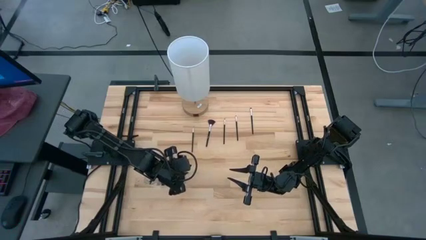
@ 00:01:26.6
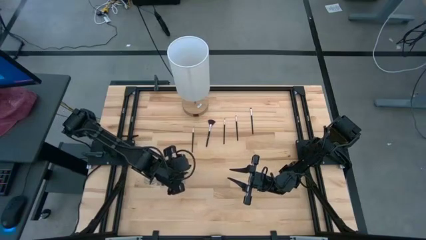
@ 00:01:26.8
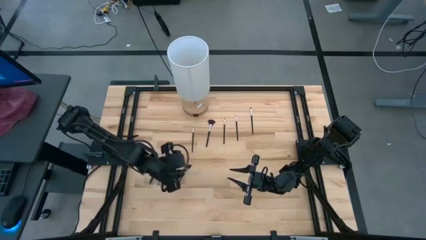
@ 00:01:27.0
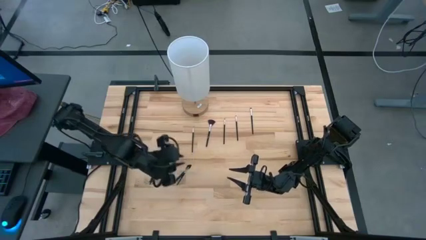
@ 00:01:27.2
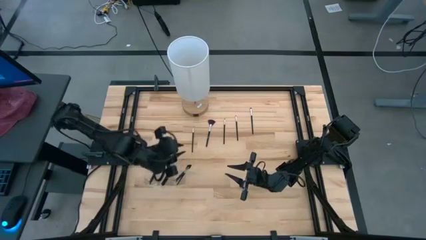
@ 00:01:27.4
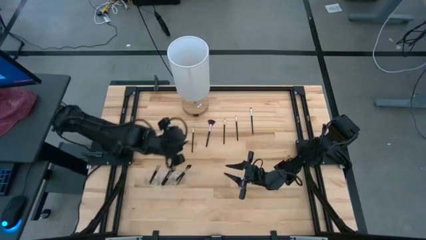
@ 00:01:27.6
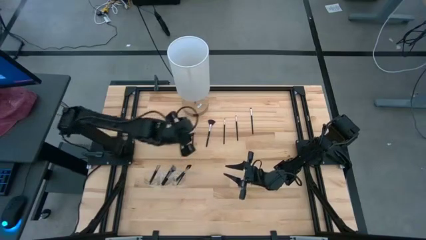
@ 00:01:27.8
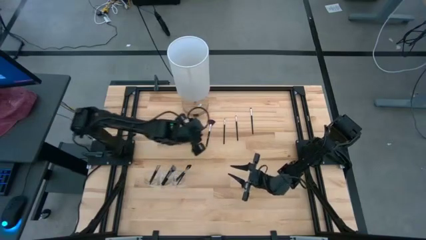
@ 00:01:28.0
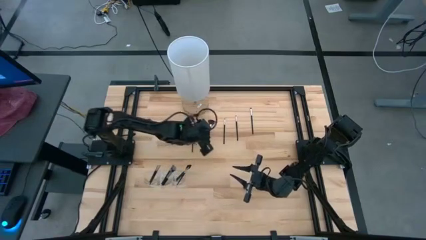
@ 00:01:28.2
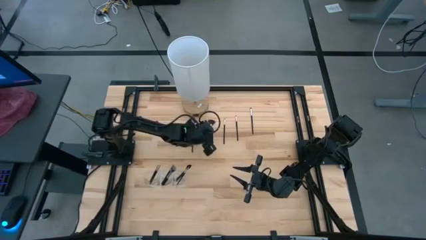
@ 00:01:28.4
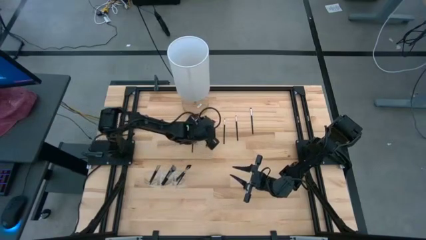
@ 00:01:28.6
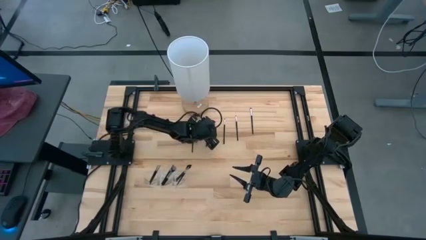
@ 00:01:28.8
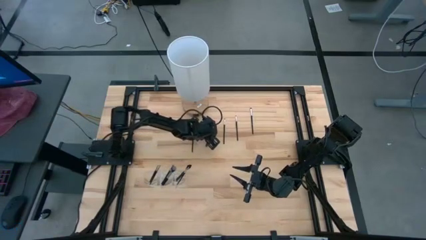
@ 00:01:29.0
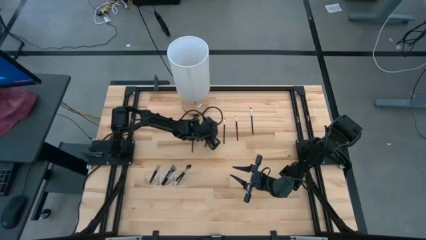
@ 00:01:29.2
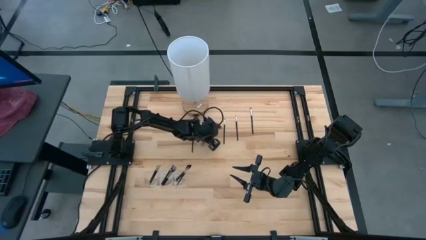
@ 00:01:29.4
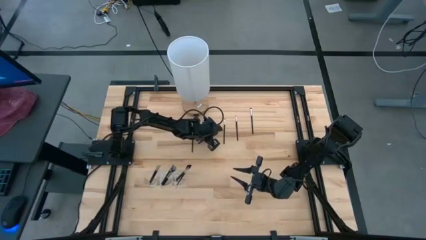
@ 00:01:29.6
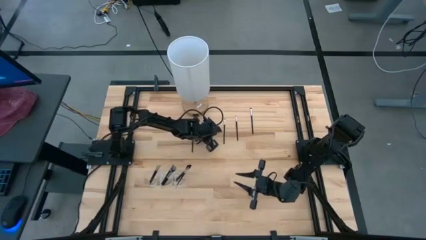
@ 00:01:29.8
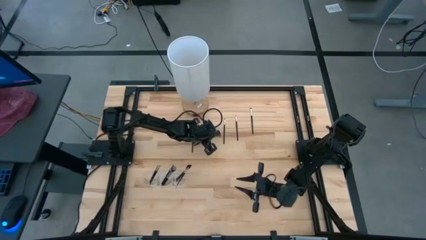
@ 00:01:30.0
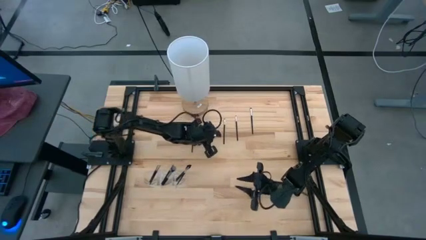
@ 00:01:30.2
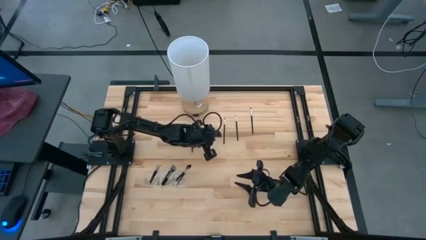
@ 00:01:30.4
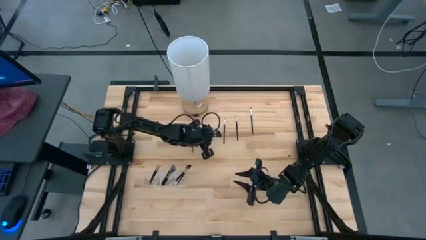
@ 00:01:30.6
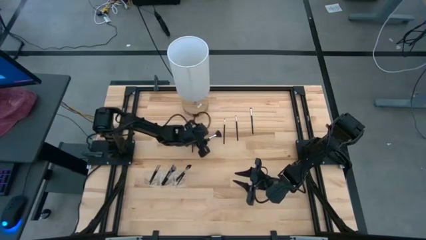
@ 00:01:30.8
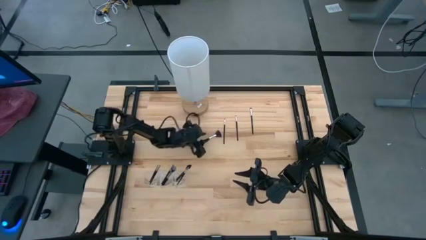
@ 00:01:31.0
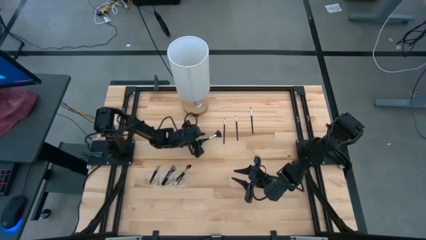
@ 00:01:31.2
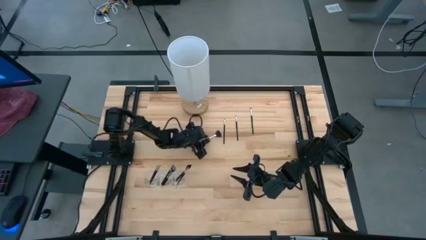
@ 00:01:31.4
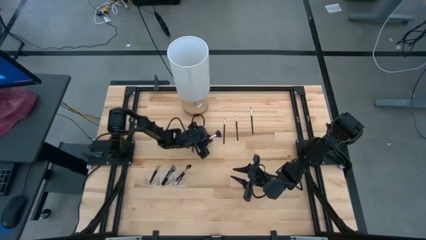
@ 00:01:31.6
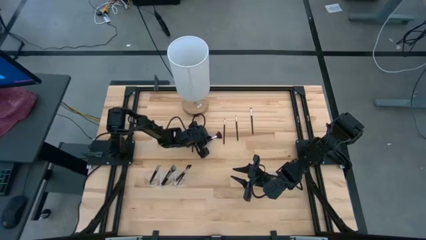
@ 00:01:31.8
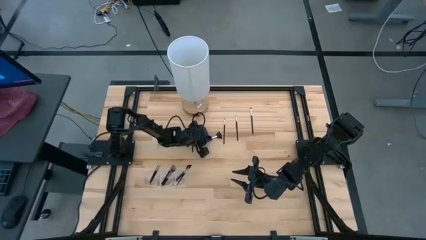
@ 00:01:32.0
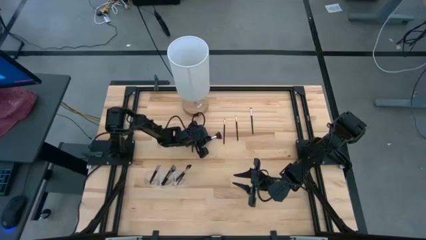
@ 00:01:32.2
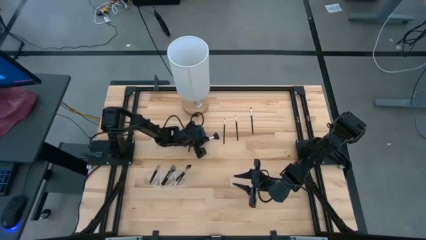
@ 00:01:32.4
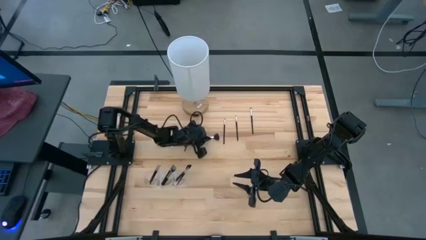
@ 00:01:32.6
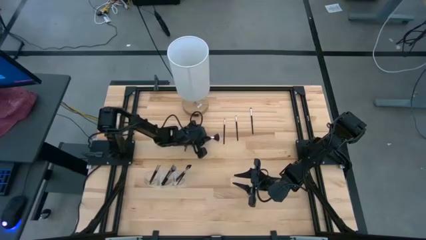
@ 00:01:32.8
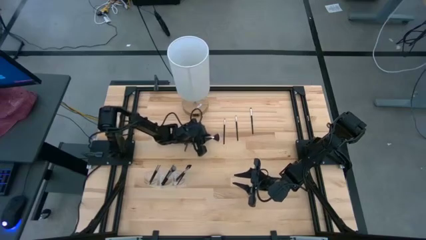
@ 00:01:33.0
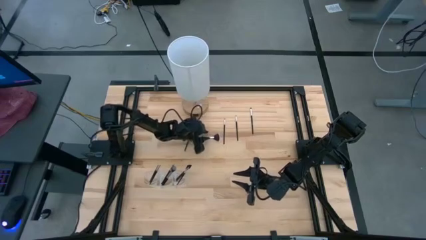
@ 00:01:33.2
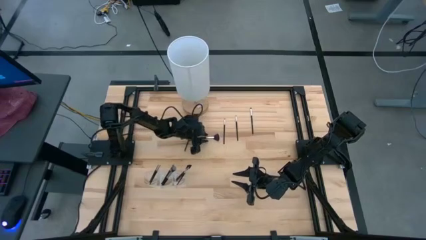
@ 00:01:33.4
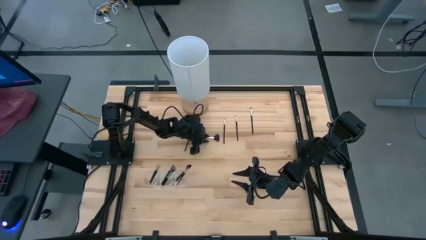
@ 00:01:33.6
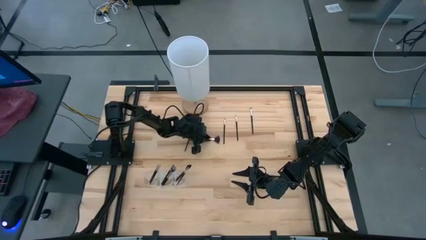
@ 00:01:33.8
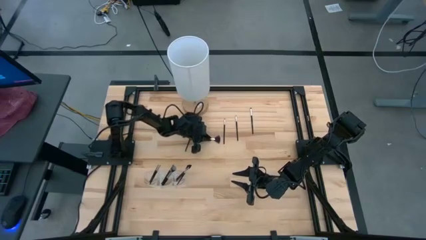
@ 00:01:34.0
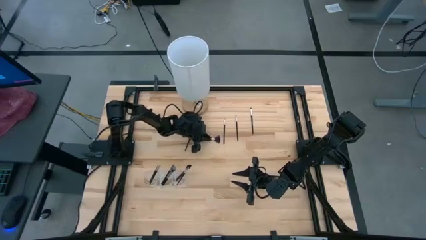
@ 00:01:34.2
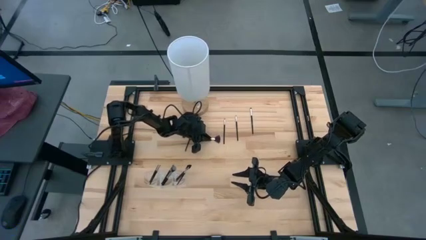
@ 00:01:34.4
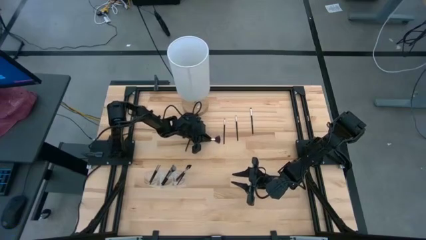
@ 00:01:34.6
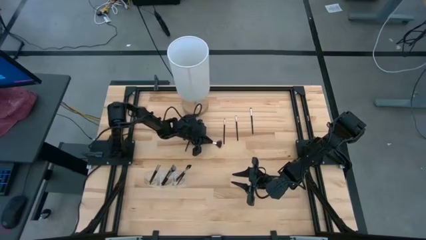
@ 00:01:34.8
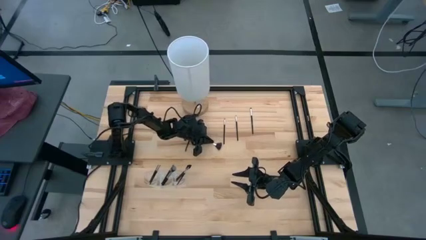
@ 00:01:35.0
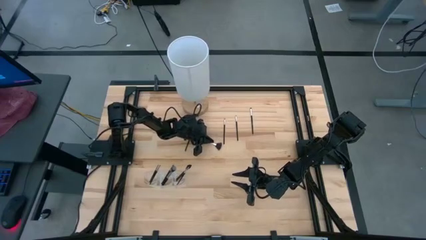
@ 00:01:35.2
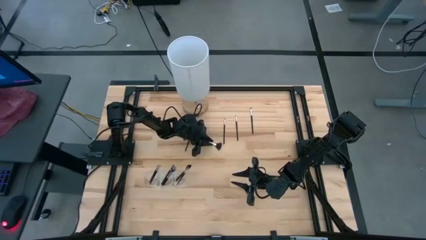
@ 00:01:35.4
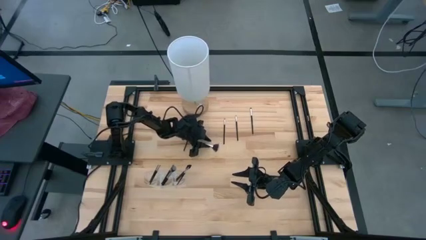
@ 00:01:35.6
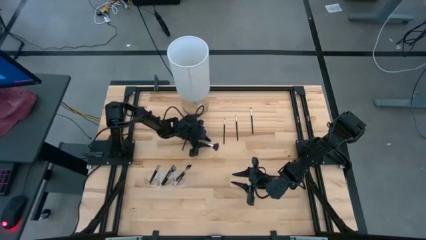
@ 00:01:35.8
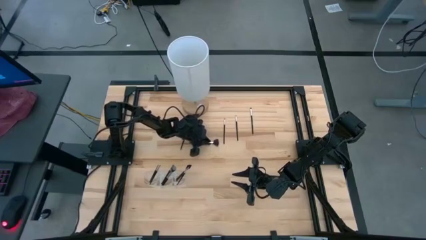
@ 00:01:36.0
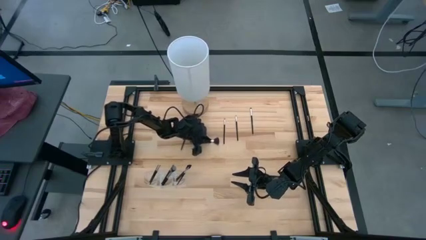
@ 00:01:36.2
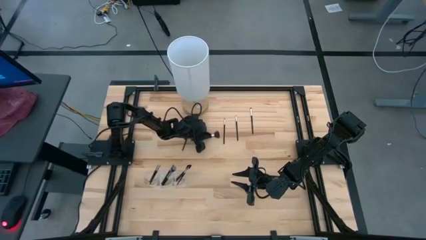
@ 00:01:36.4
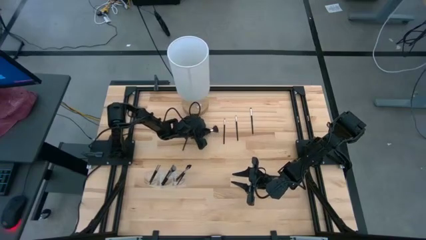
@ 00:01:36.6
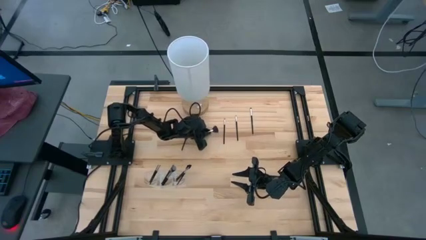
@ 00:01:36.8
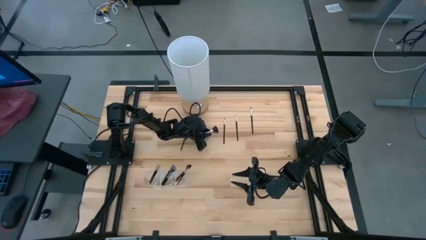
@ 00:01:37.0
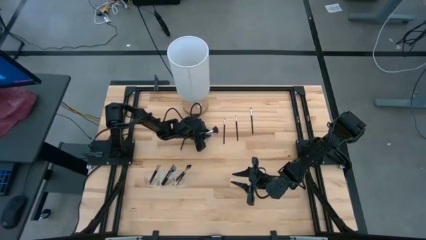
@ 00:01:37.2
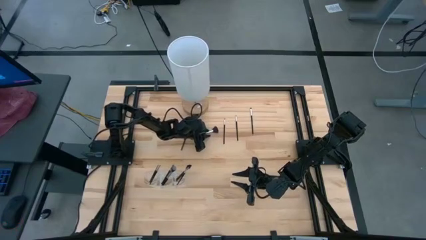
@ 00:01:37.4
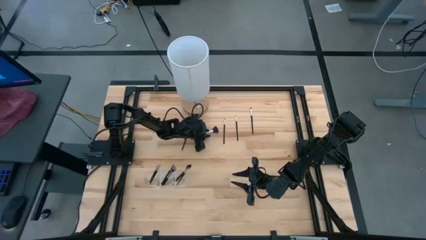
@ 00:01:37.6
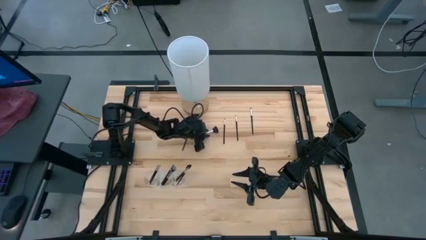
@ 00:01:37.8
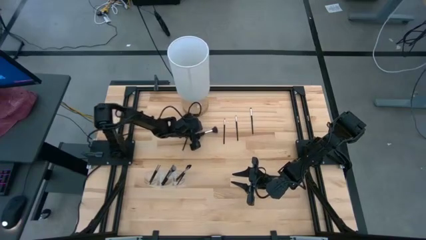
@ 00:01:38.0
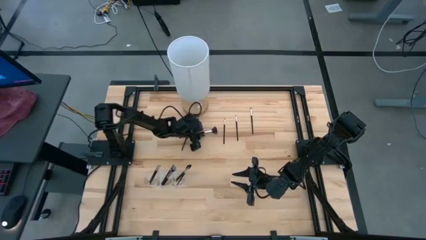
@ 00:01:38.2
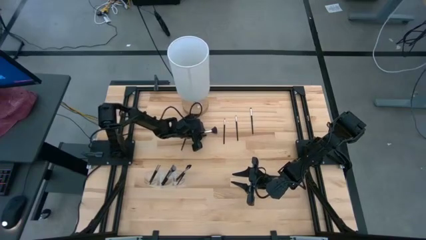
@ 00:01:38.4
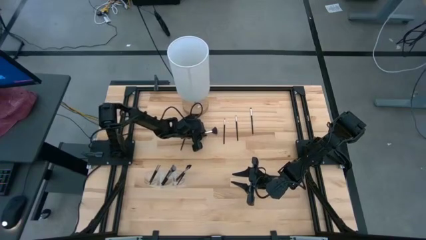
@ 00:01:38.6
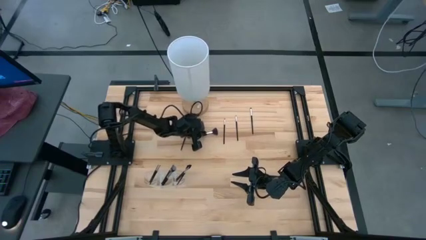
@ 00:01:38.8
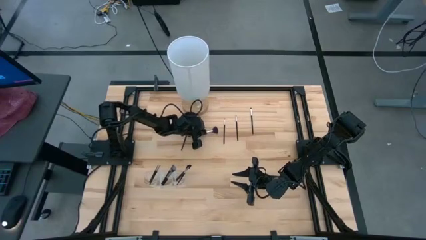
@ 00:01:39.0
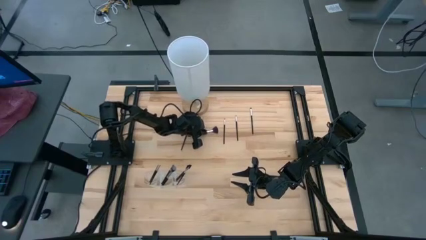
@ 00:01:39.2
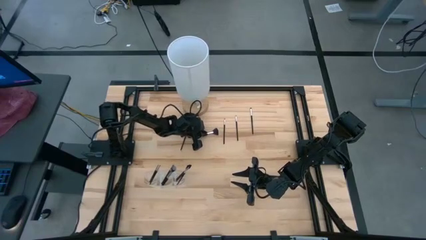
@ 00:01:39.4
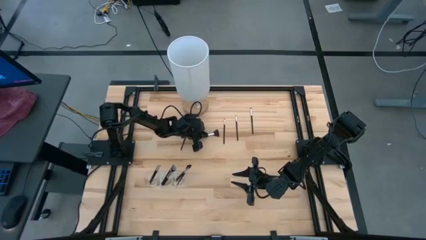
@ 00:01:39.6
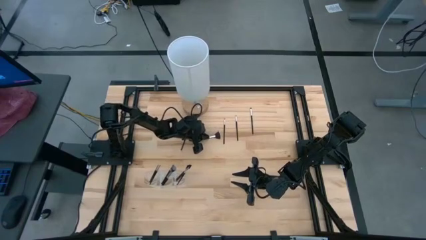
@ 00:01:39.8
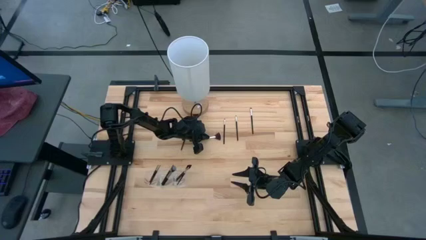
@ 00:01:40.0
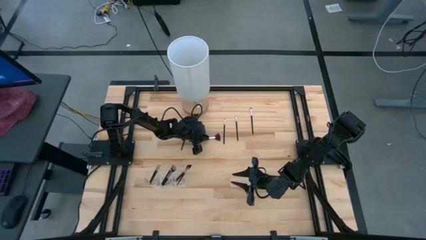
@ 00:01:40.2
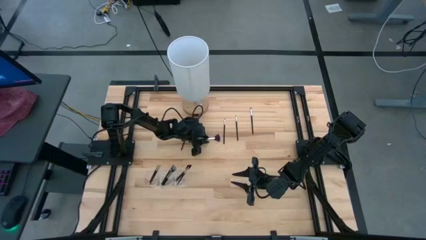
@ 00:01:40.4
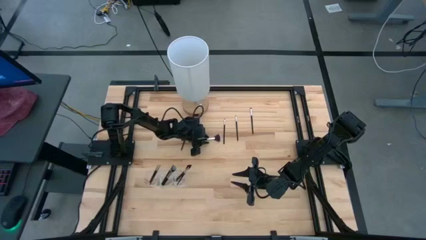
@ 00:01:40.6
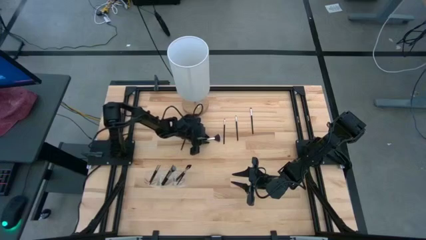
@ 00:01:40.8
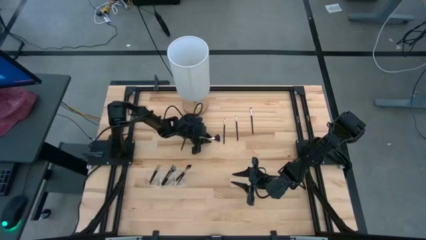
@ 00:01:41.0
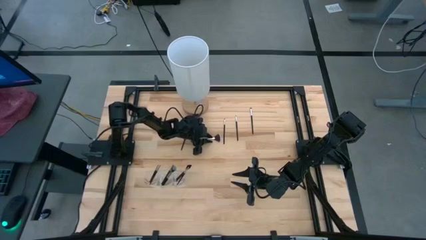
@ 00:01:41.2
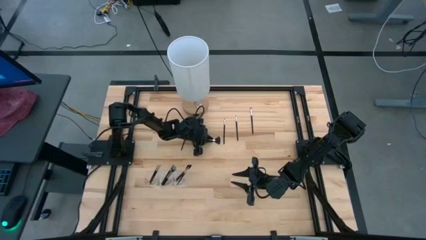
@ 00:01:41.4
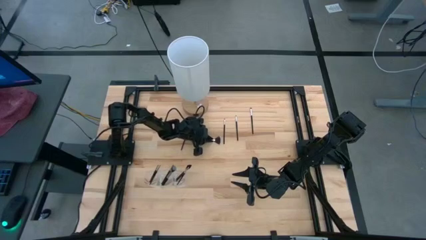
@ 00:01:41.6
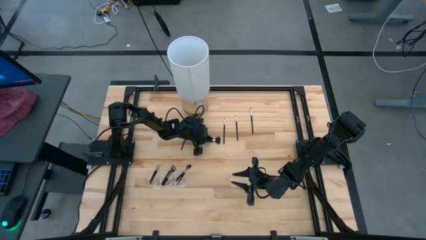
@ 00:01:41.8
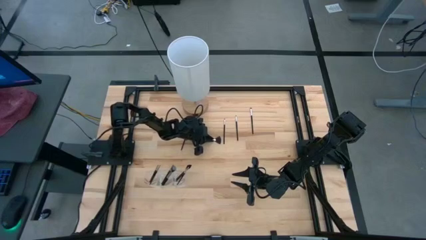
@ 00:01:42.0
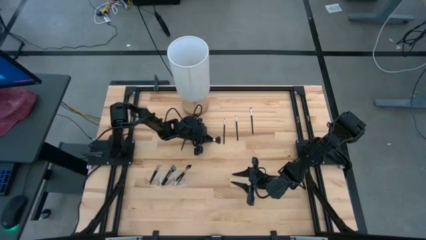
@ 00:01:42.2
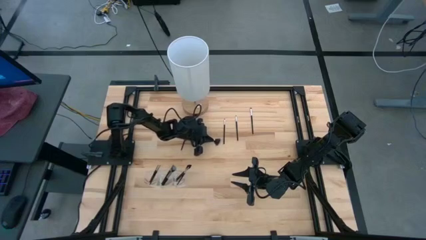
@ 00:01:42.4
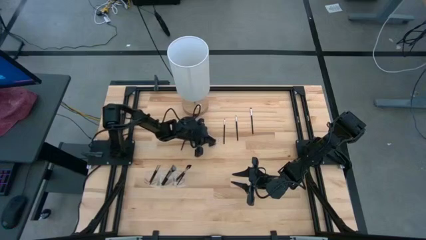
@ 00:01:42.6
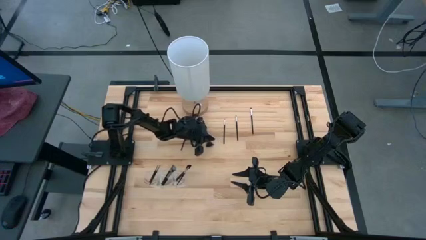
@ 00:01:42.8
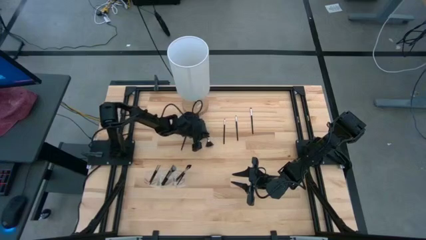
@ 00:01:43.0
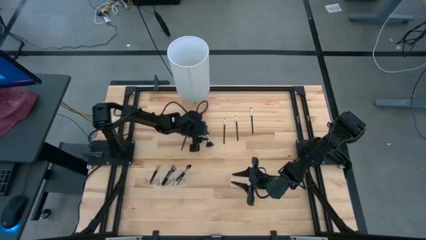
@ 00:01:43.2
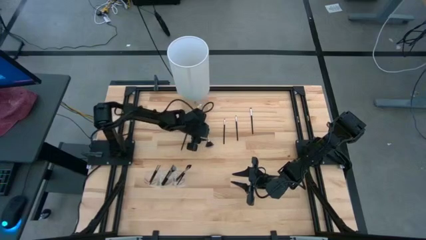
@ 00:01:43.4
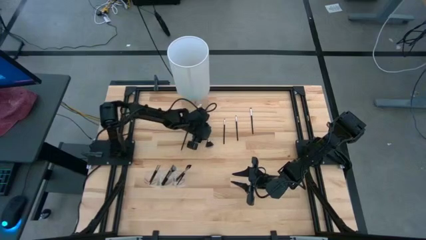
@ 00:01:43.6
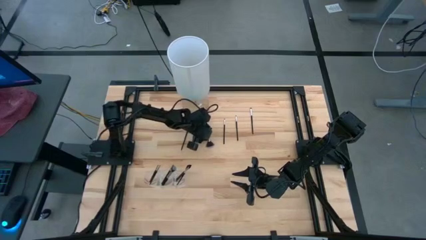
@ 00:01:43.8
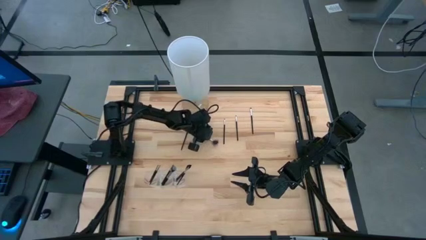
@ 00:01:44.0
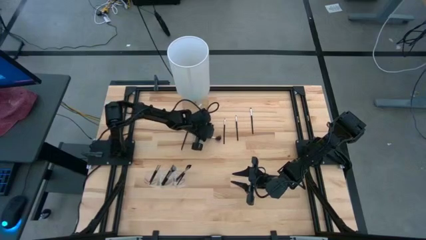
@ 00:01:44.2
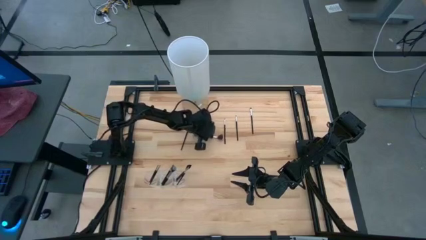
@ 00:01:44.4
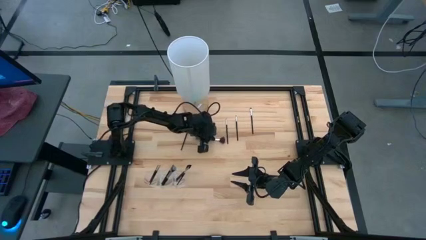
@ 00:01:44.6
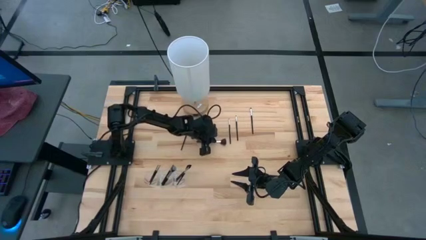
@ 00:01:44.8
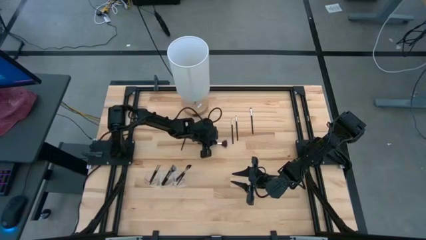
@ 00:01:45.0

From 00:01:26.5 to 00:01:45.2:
Task: Put items in baskets/containers
Put the highlighter brush in the transparent organizer
